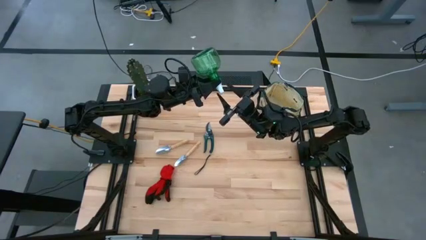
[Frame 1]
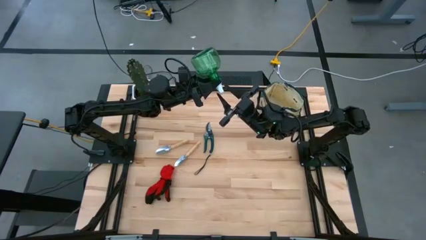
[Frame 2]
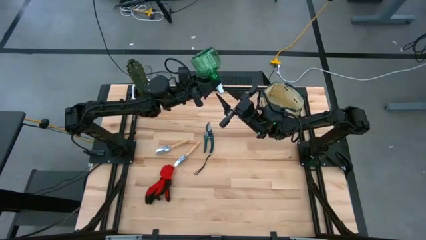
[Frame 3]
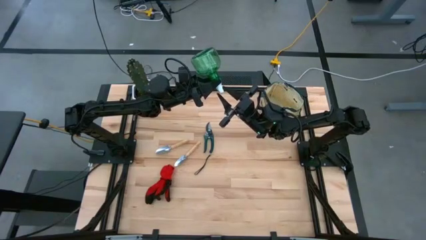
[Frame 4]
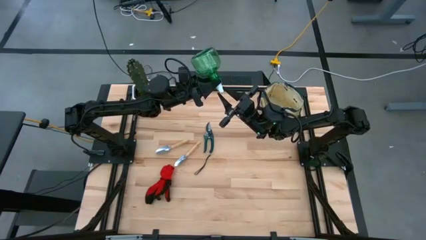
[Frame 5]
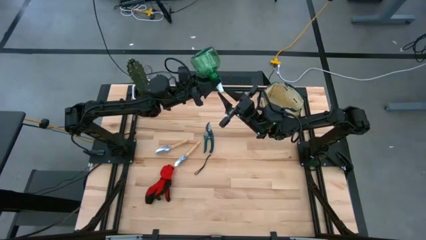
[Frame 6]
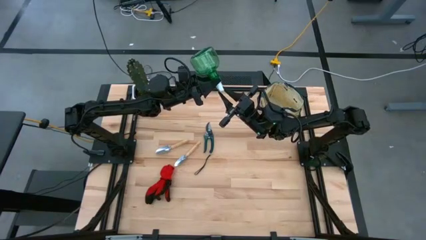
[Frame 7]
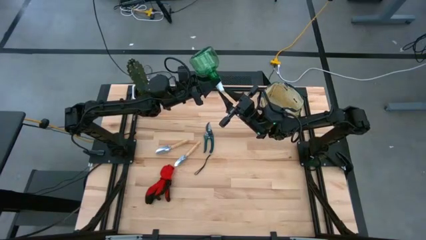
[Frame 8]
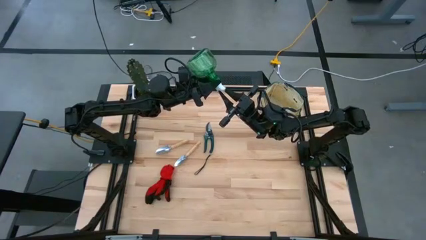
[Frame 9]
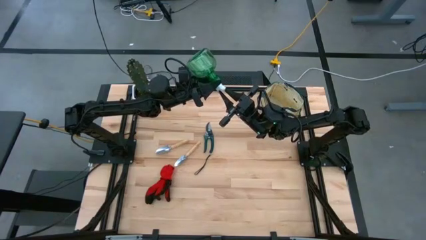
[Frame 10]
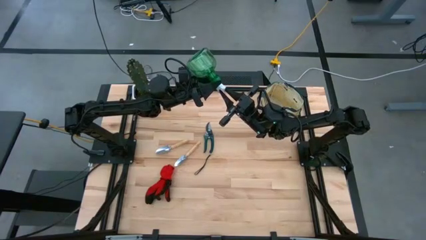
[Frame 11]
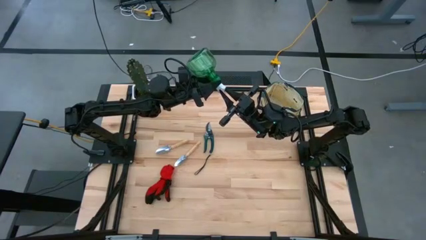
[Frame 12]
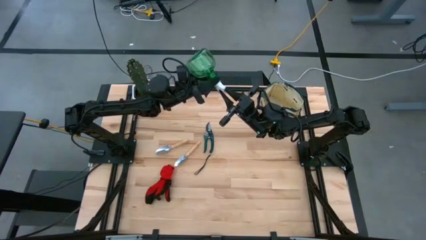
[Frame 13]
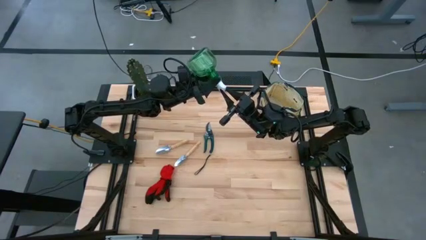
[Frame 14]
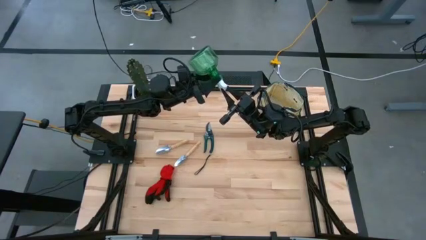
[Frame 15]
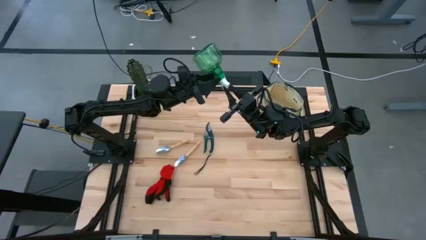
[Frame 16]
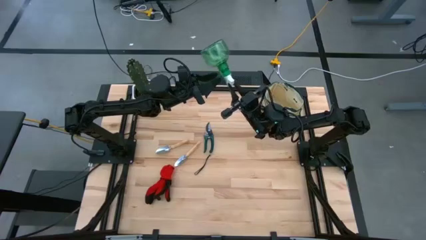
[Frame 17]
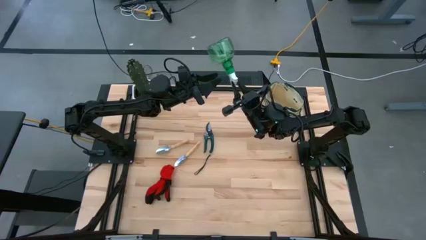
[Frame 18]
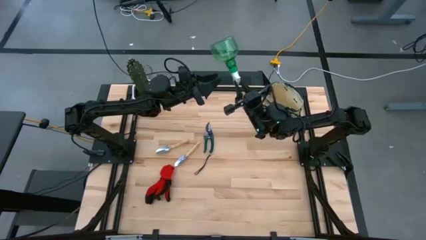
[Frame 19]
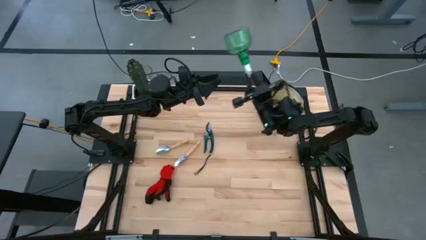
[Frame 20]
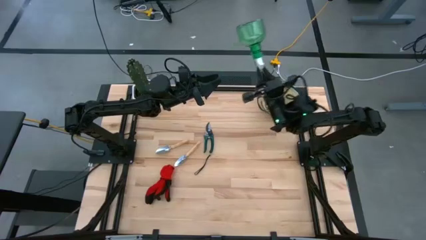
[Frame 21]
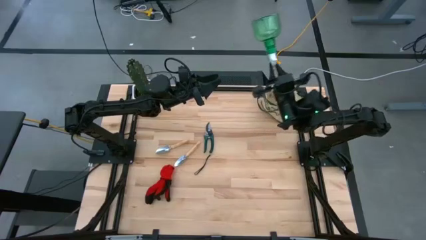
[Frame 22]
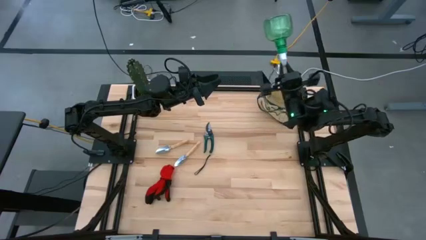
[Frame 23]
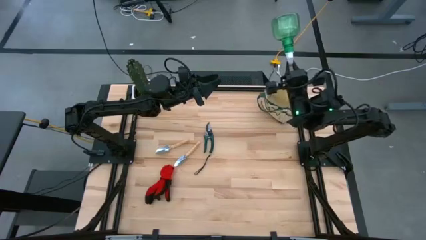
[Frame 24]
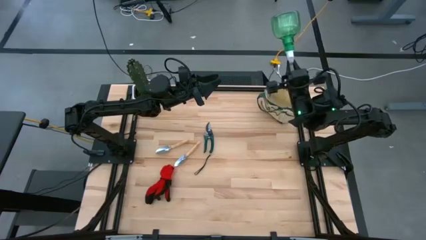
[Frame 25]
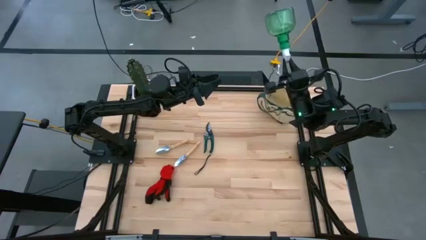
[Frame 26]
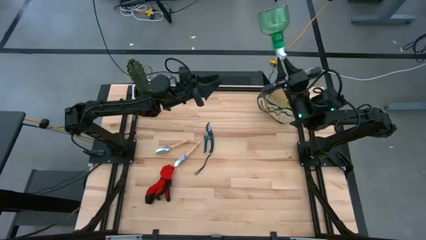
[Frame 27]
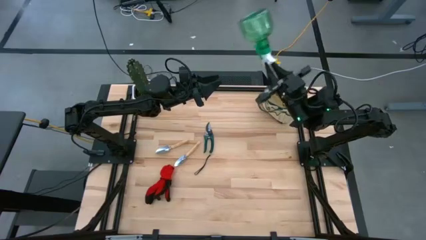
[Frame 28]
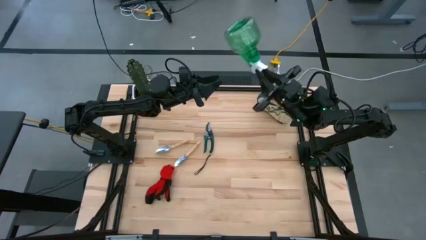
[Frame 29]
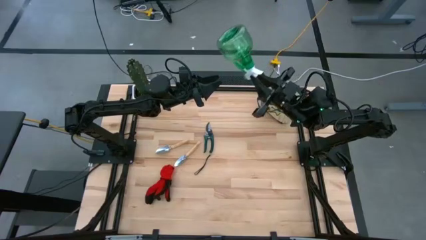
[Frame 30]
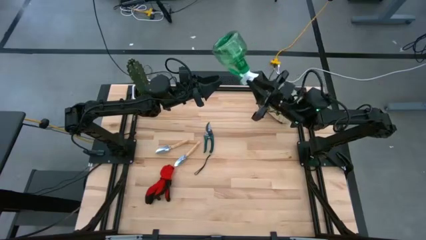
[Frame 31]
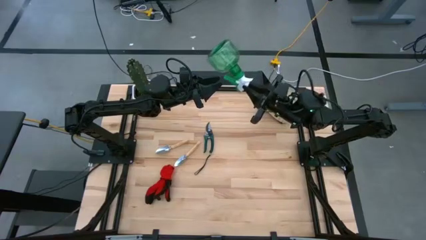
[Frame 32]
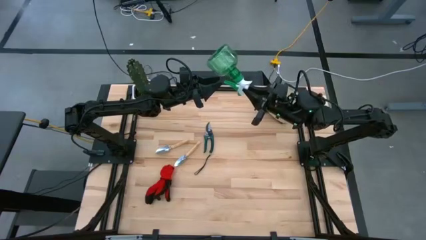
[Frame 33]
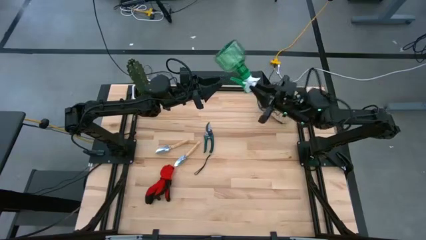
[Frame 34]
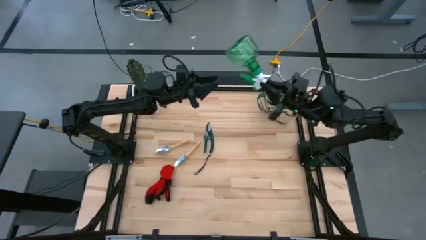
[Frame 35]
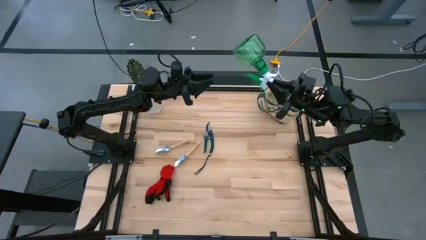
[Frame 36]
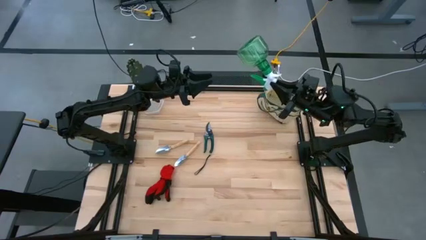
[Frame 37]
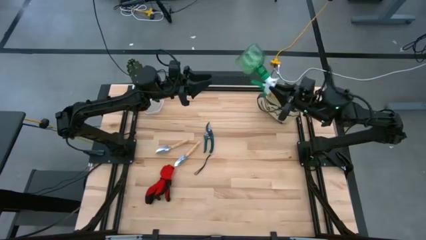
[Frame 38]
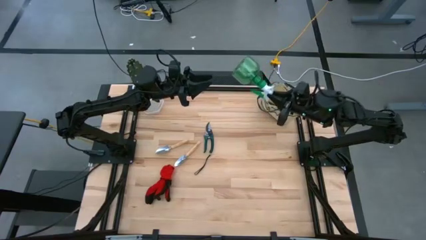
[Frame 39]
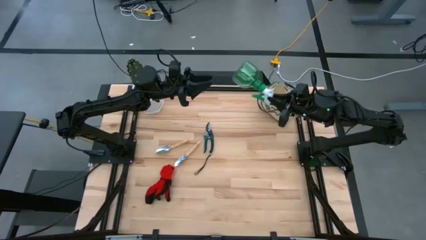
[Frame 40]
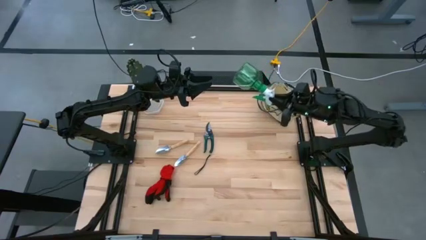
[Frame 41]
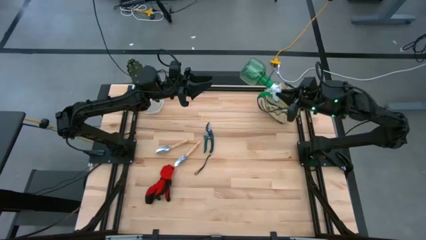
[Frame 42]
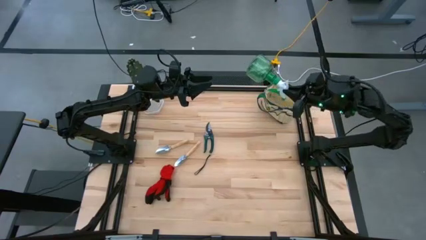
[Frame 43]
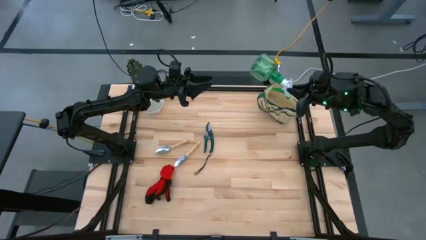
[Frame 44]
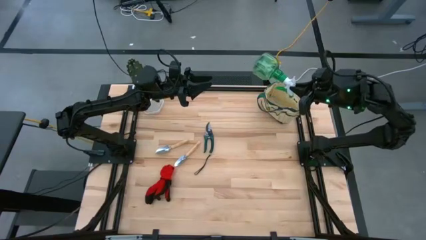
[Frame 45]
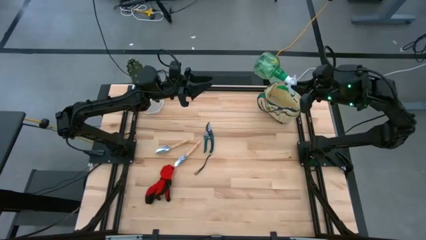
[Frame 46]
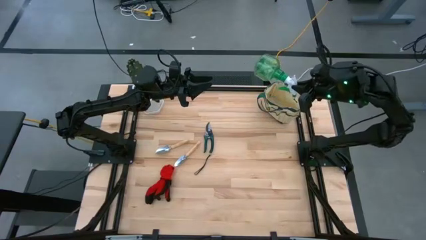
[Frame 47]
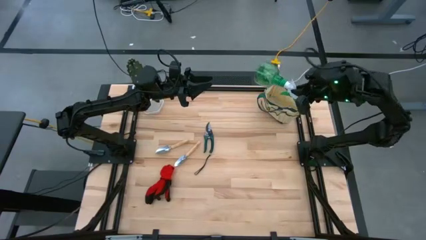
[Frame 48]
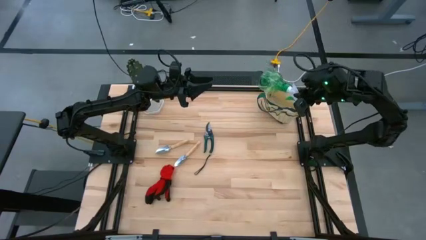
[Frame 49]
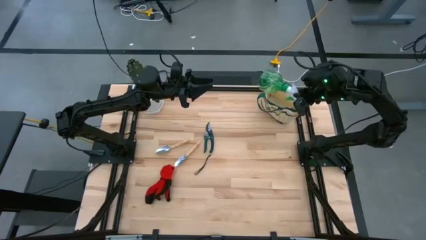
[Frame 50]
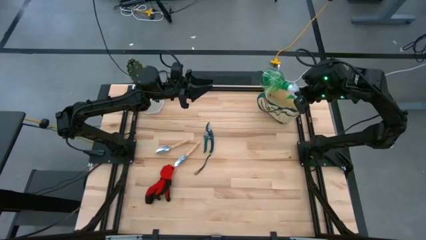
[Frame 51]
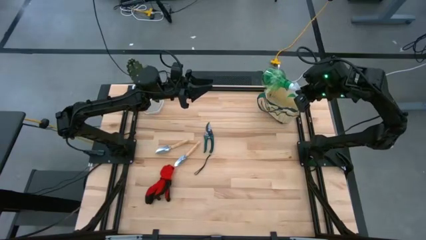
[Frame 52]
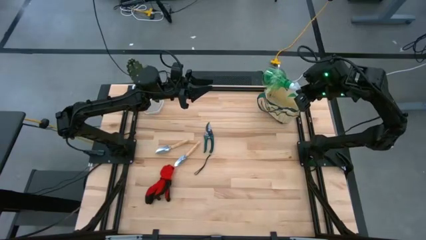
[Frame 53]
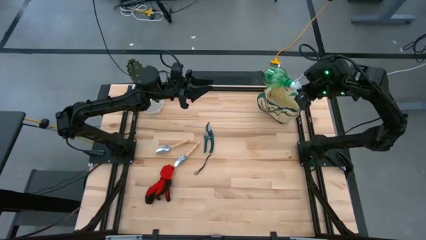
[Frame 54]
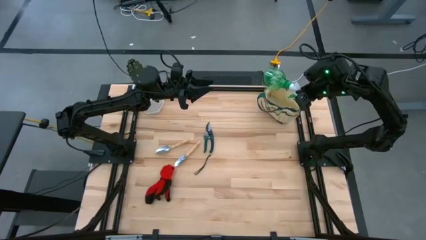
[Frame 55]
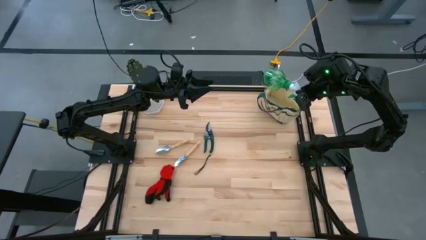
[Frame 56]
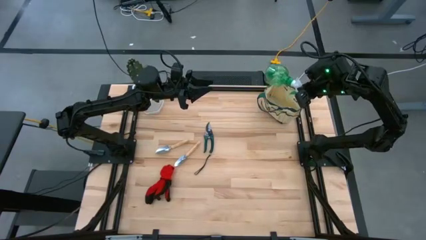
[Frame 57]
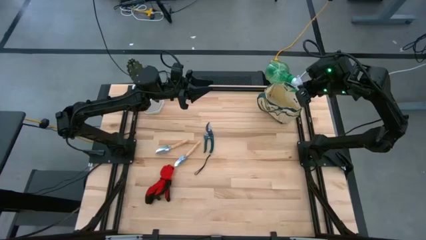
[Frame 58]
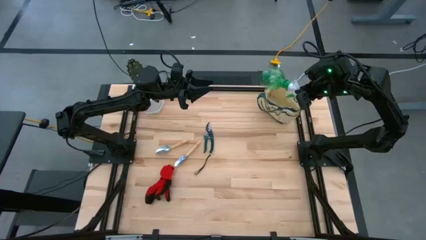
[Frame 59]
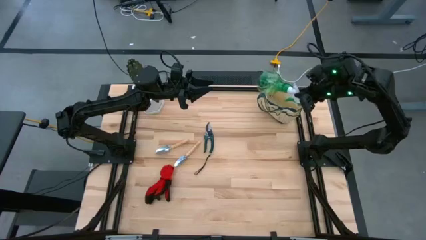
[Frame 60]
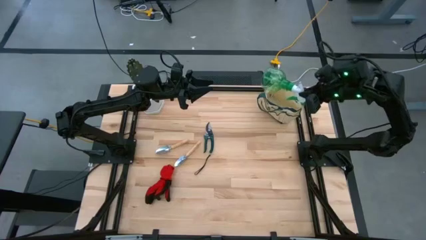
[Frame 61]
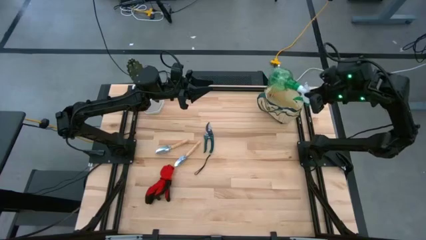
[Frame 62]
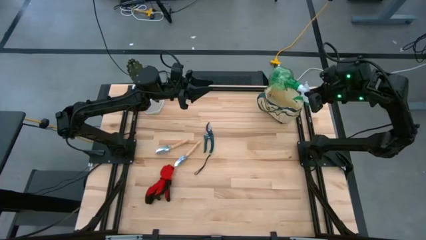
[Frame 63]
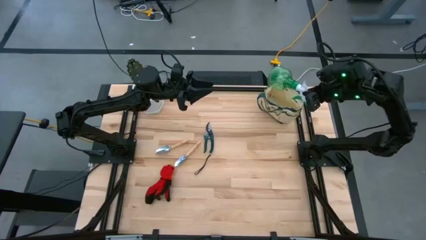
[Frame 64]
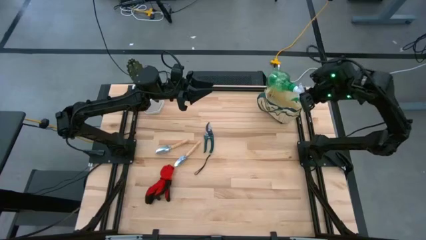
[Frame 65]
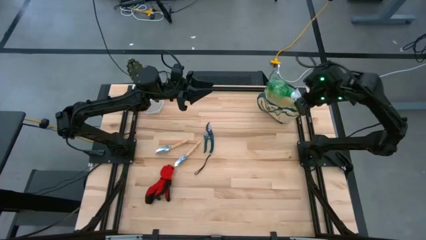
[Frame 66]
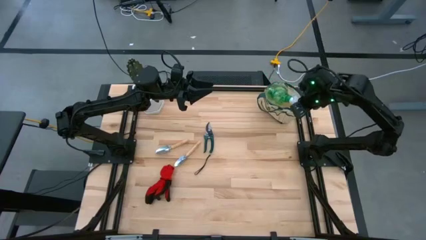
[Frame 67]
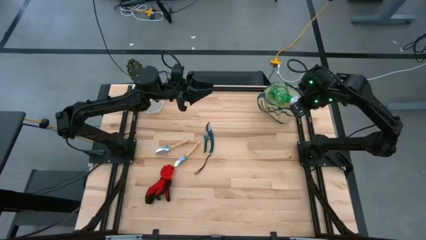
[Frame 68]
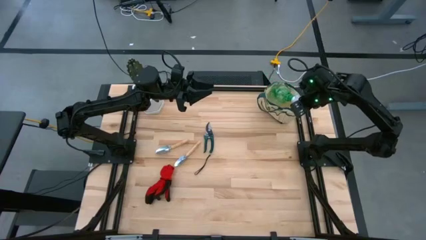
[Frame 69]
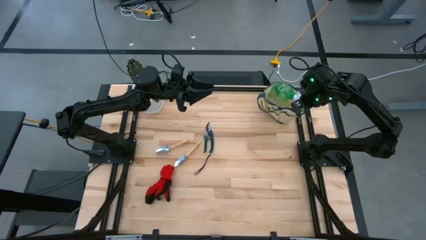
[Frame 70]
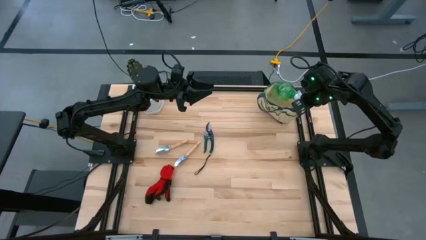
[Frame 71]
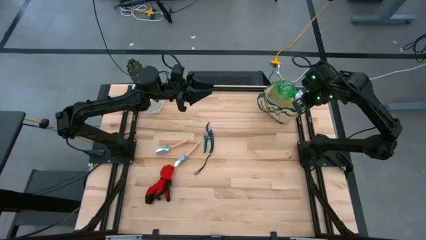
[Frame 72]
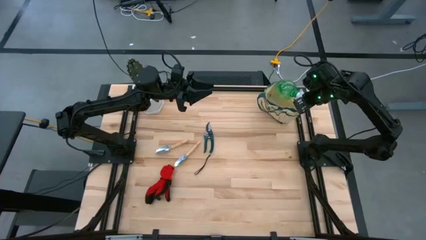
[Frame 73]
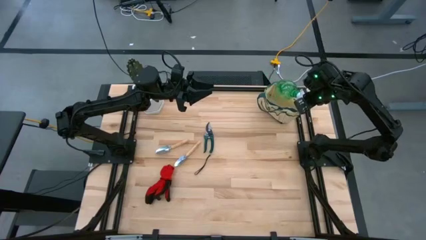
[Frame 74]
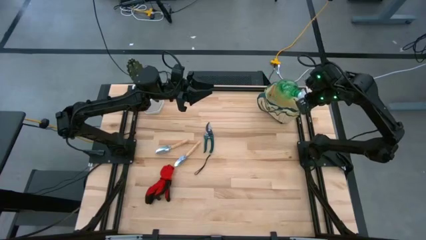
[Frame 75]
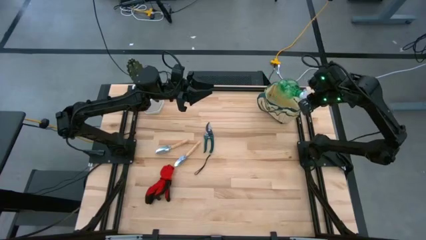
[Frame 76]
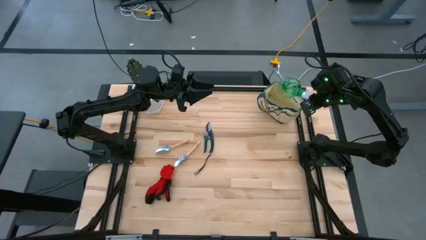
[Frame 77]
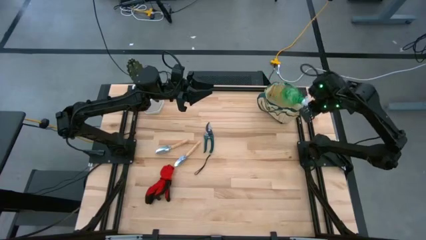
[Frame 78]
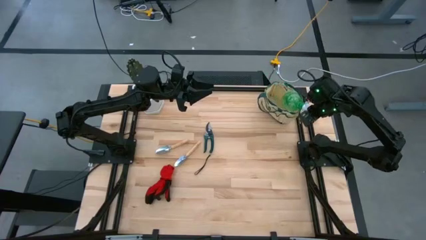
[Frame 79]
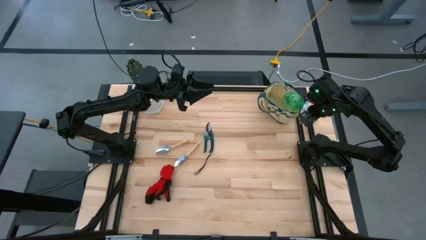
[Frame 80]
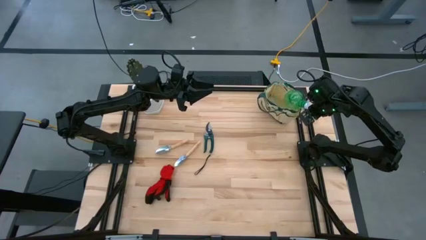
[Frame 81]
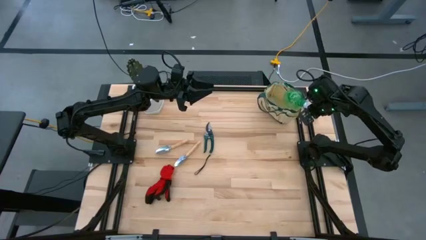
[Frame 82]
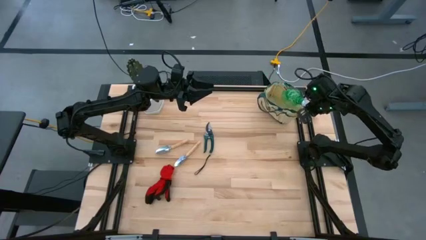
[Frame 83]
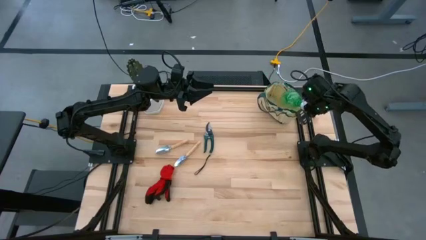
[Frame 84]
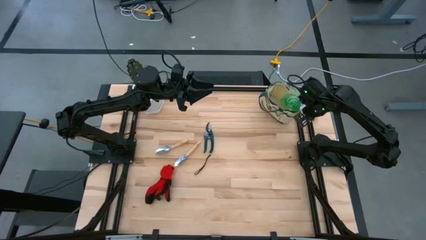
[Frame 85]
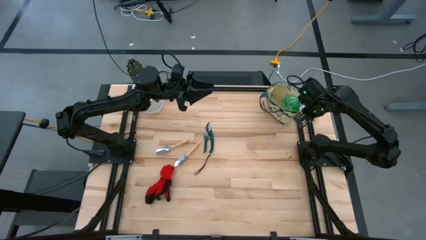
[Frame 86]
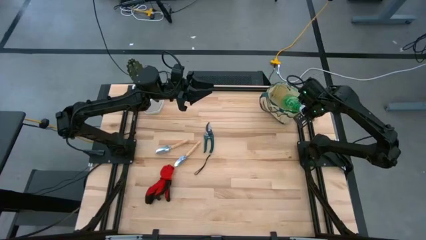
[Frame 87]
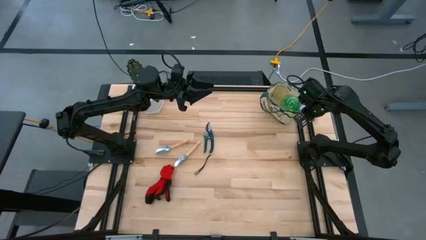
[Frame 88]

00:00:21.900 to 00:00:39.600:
Task: Pick & Place Garden tools in Gardening bag
Put the green spray bottle into the white gardening bag
